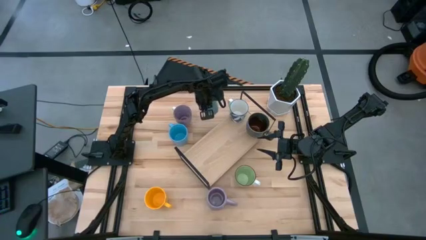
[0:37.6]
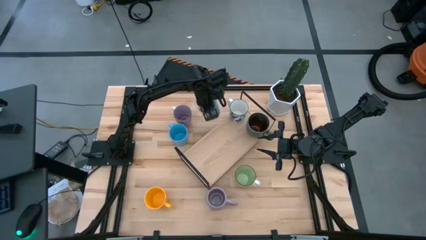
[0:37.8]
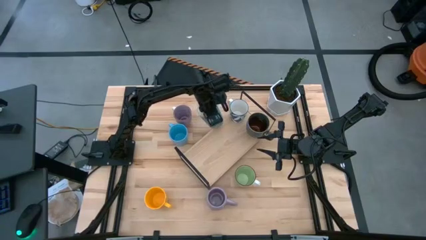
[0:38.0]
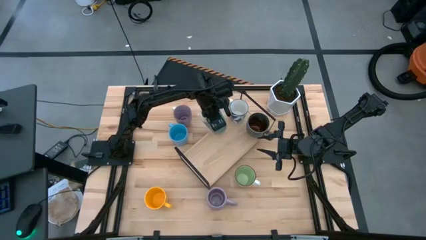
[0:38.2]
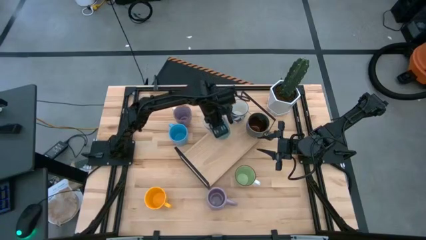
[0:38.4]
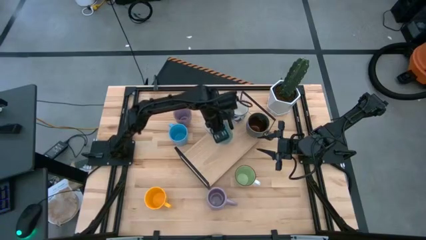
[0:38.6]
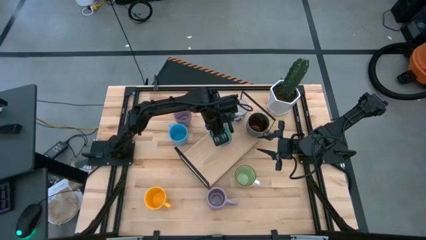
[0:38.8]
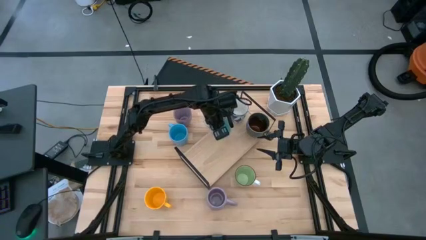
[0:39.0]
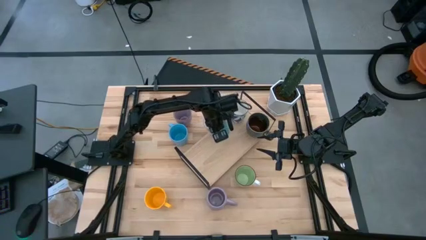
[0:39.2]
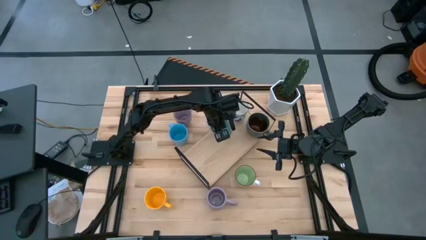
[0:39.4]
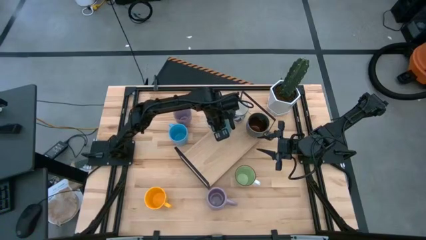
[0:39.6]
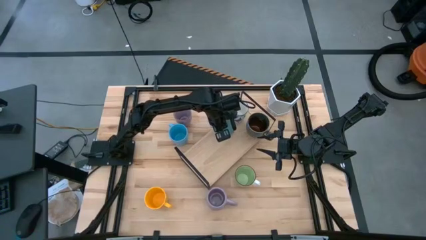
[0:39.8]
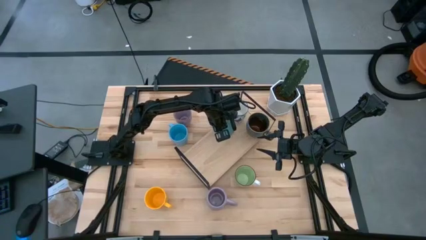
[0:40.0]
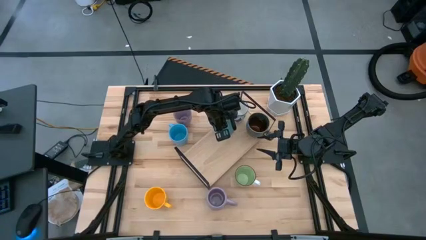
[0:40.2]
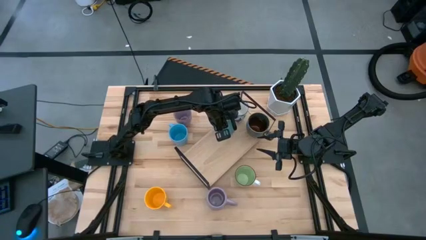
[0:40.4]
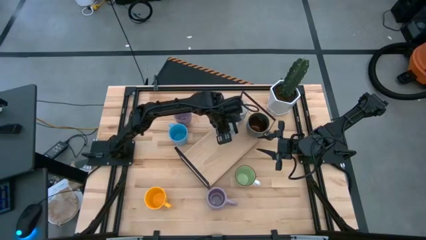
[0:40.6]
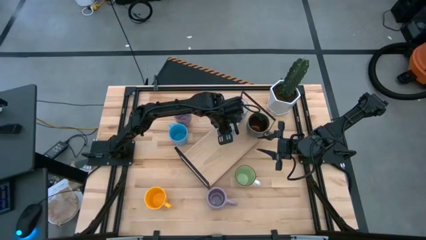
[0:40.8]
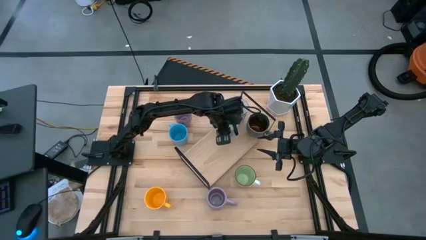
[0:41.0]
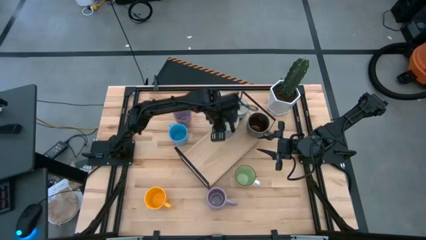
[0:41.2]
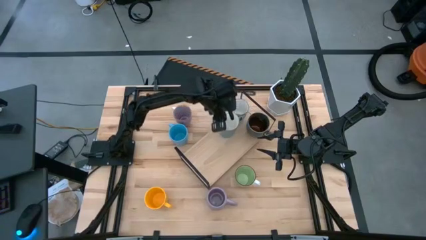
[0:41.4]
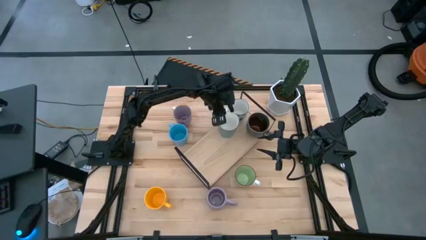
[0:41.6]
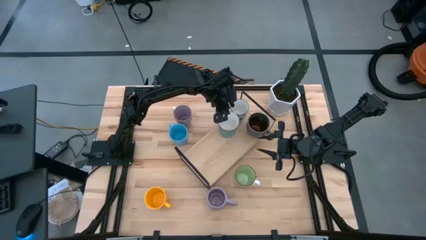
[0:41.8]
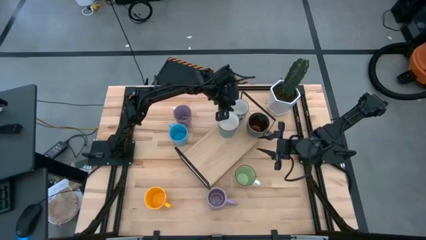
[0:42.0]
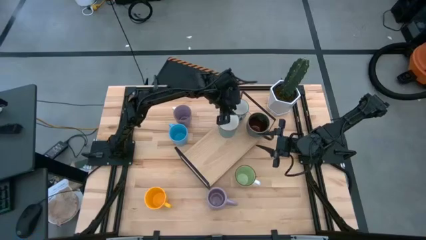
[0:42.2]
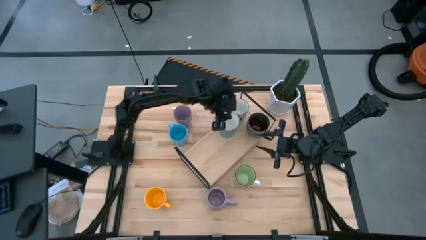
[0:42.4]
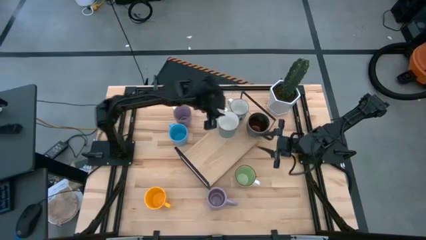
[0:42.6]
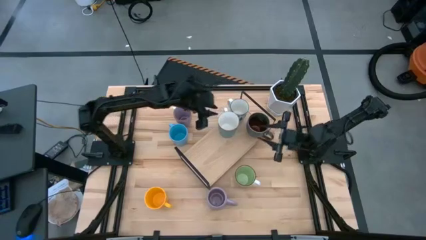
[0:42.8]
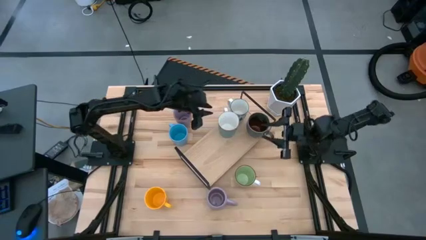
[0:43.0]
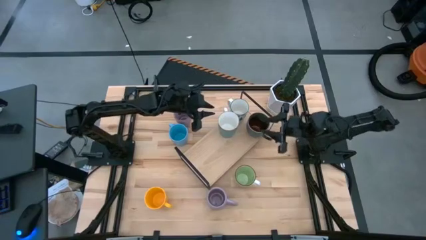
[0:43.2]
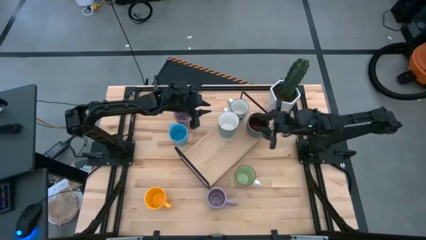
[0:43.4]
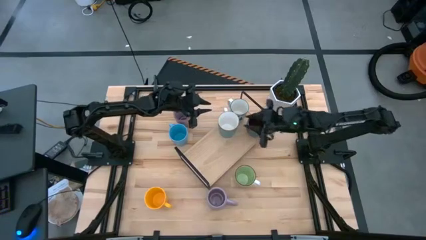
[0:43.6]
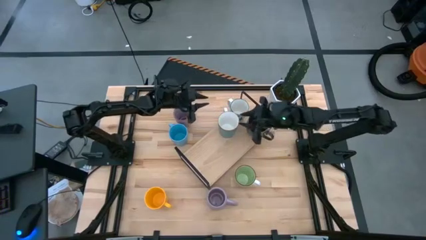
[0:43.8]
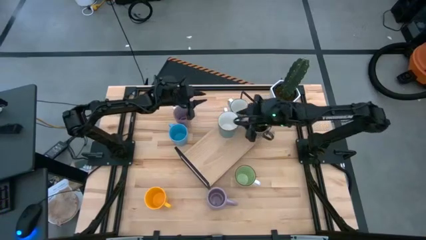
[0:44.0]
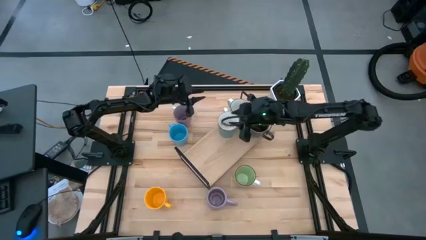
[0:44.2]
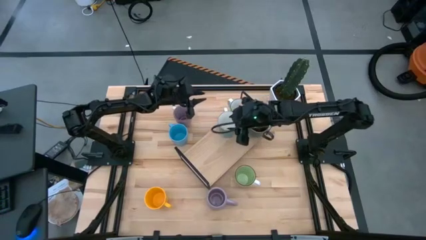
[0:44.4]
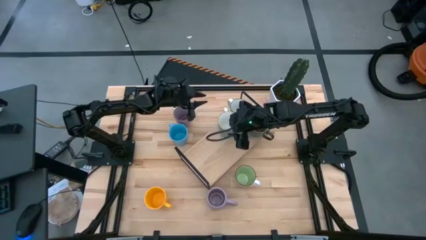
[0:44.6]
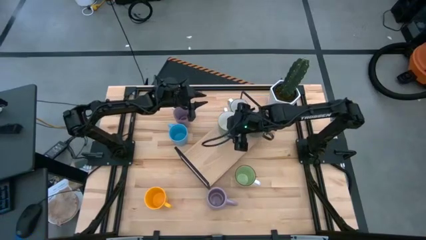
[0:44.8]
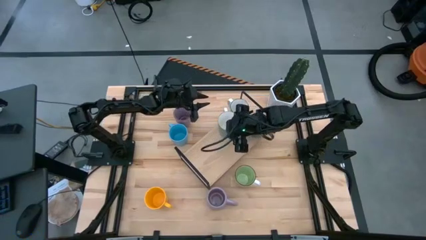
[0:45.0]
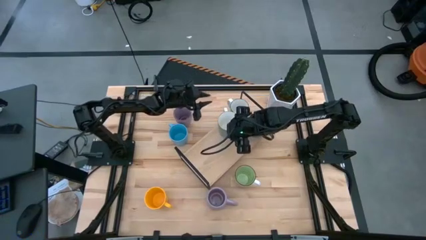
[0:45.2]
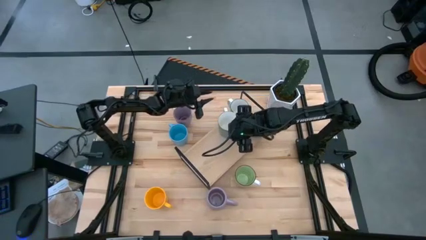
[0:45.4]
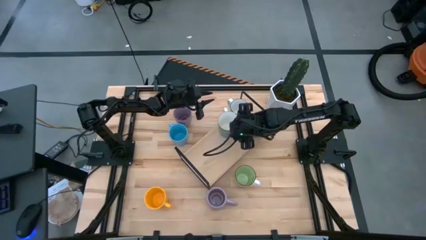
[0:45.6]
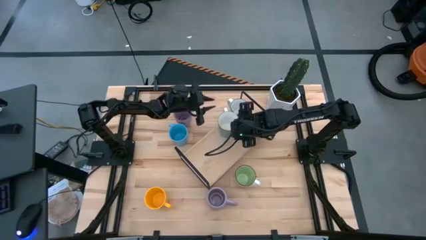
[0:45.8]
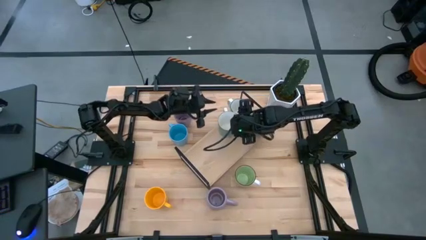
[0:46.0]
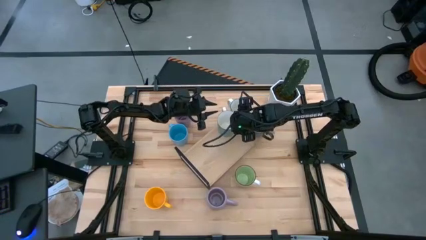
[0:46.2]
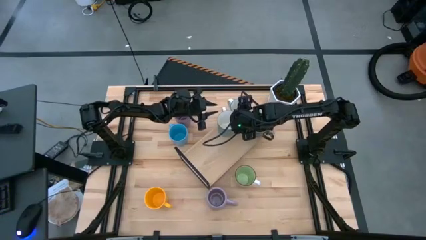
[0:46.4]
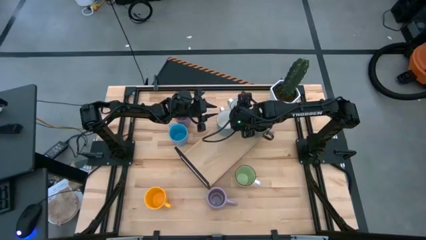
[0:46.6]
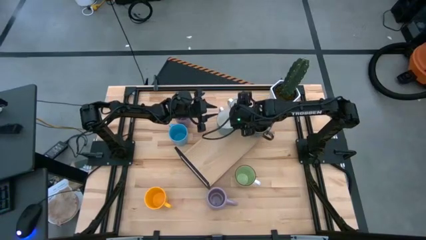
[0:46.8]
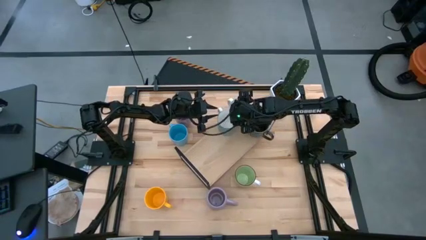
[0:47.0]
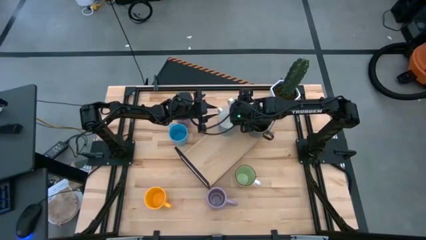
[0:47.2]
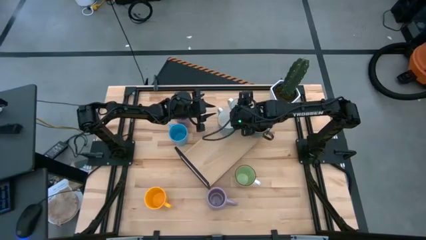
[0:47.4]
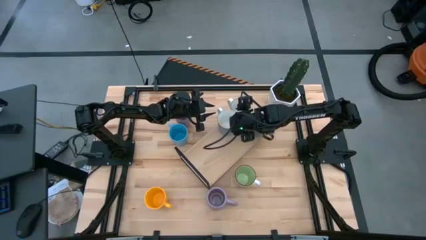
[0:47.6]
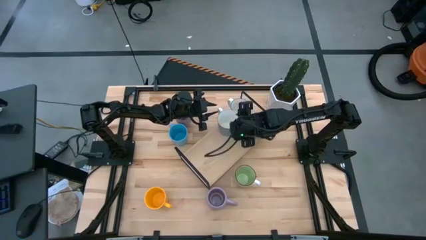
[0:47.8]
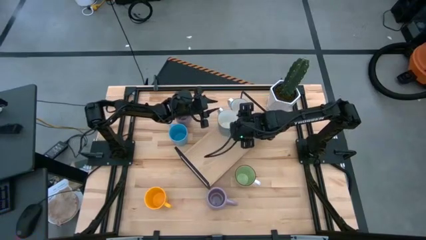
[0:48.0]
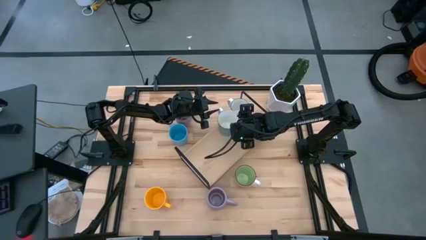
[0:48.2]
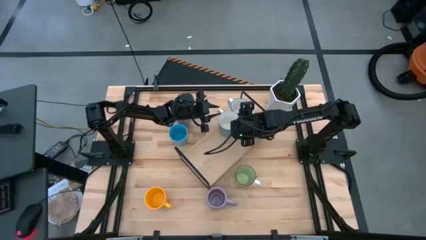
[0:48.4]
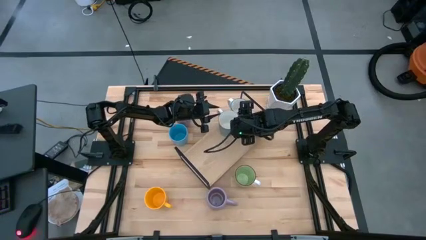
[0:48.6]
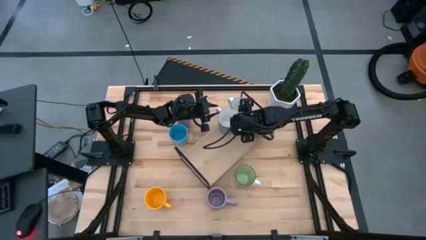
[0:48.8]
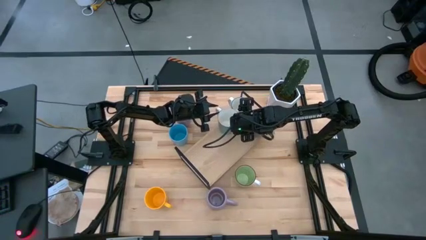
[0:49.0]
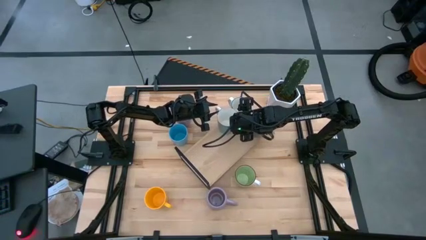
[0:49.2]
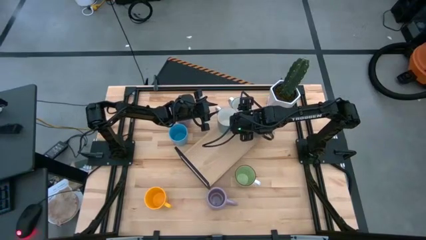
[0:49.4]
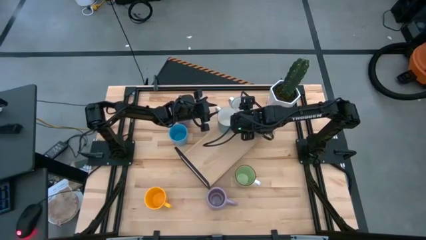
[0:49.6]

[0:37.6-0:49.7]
Task: Place coffee mugs
Put the light green mug on the shelf

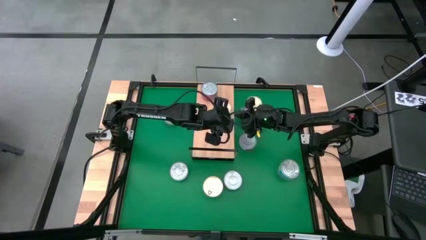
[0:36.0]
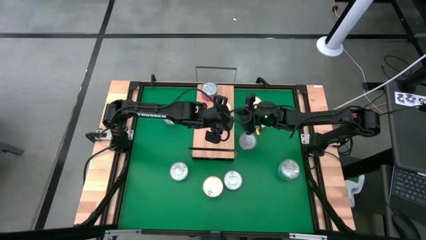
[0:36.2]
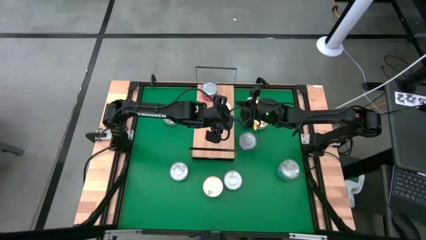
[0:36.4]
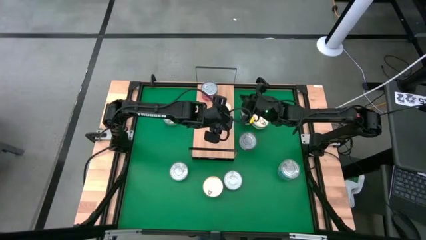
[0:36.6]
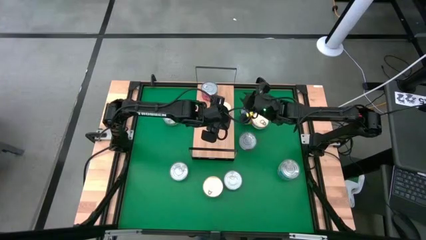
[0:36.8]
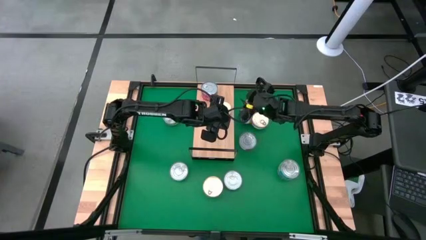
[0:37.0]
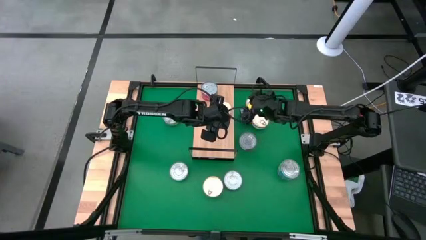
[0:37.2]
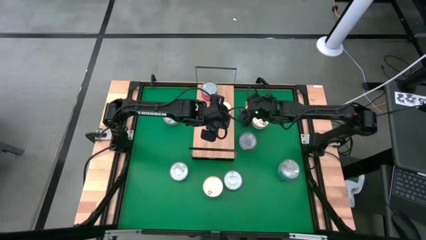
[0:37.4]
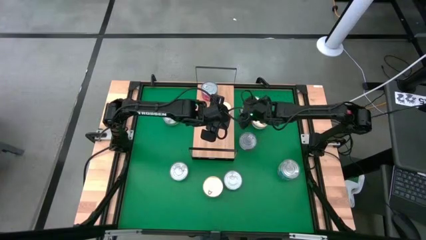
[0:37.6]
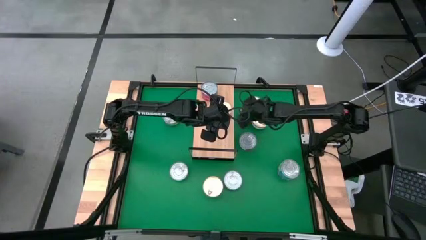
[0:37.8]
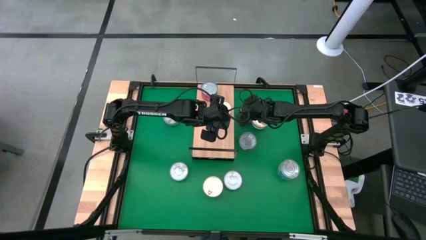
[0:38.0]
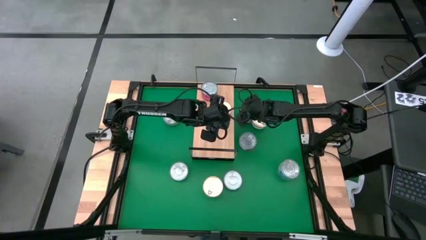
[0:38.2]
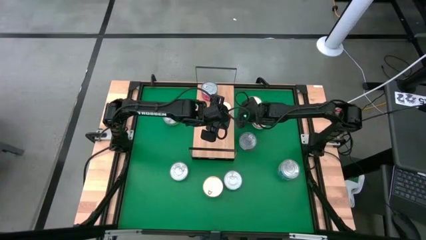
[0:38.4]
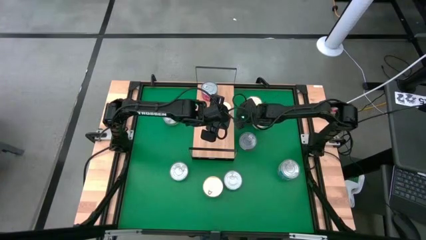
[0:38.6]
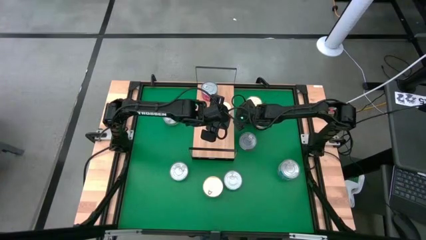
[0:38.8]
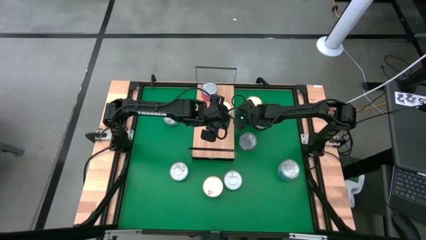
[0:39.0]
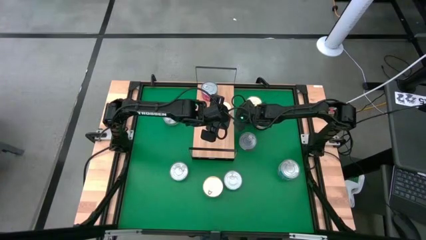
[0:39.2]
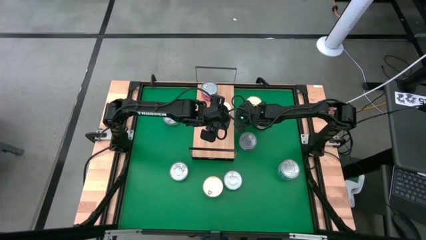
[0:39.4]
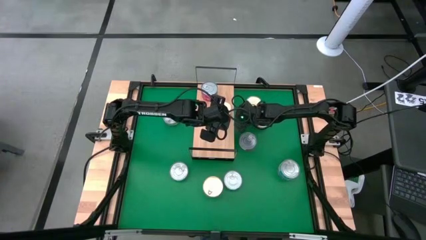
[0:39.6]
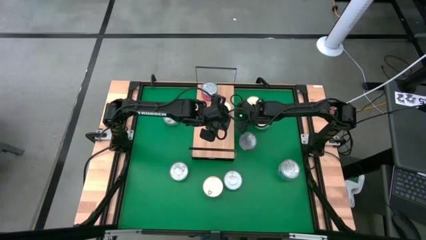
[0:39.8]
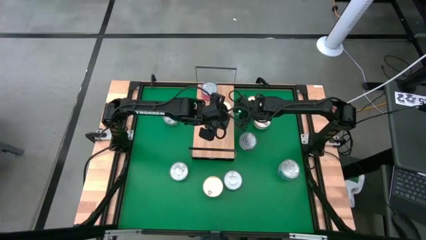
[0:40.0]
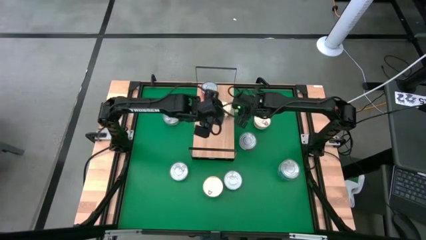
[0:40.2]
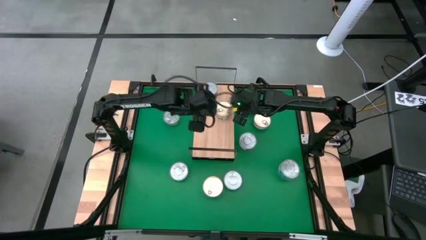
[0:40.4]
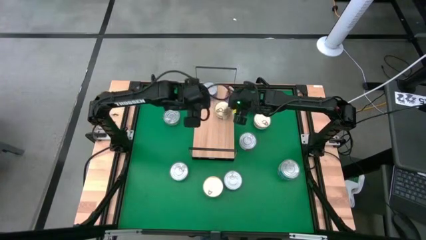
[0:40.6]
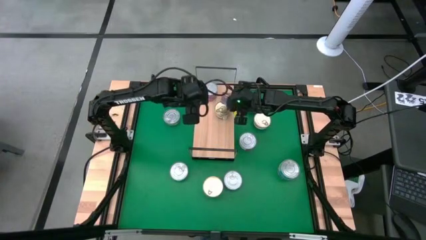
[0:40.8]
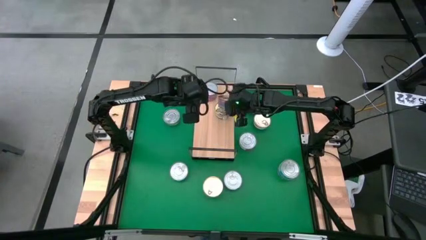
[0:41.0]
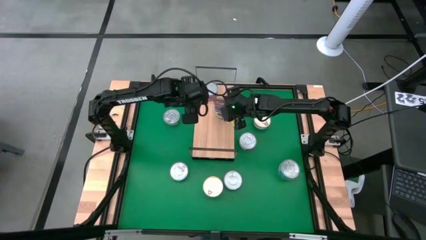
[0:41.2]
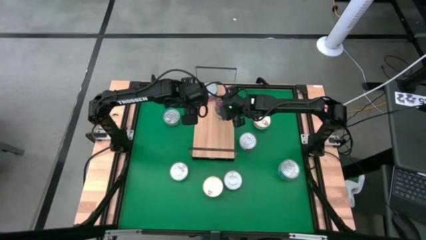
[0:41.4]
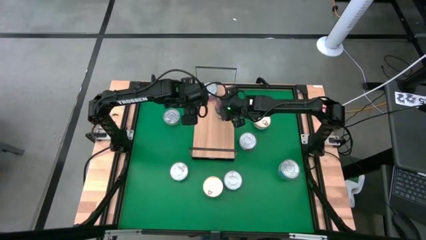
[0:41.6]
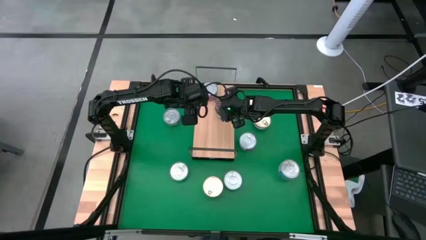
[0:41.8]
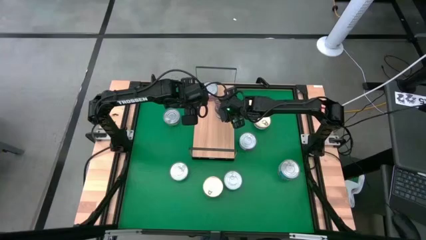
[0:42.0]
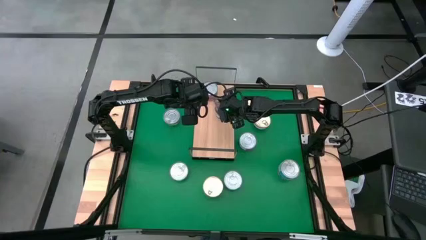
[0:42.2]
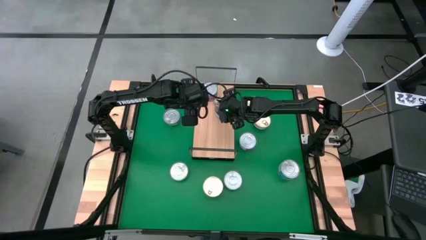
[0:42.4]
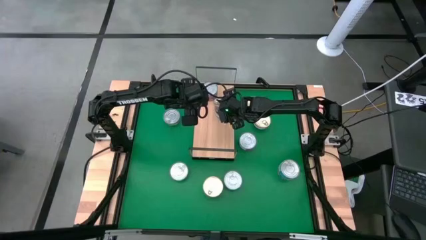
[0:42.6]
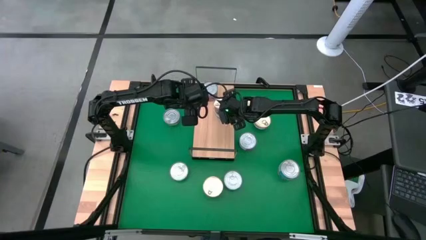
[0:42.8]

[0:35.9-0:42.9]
Task: Stack canned seafood by type on shelf
Stack the dark blue tuna can on top of the dark blue tuna can on the shelf
